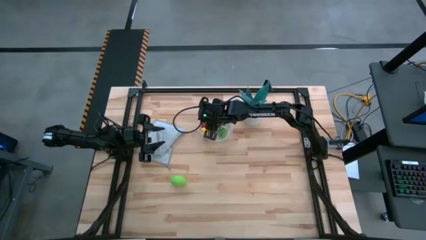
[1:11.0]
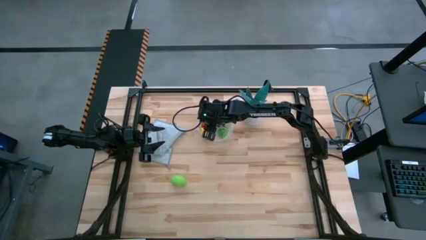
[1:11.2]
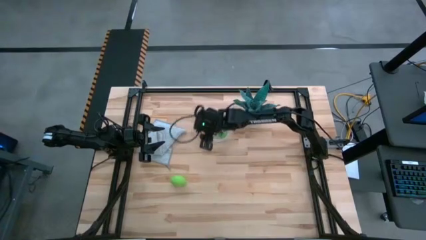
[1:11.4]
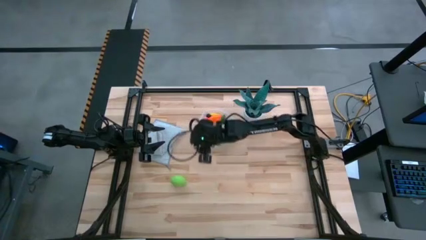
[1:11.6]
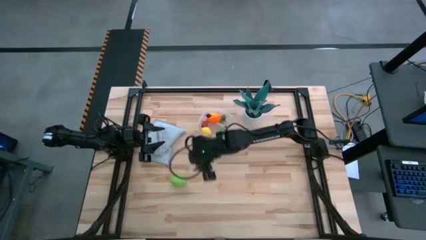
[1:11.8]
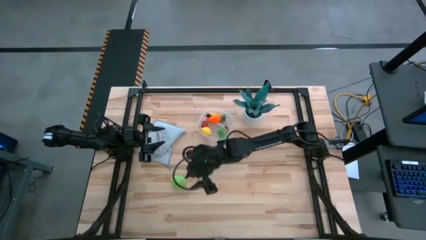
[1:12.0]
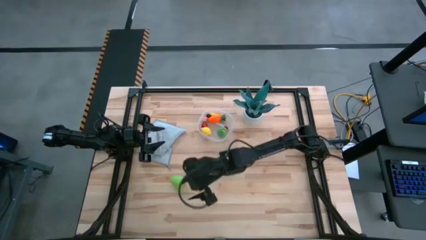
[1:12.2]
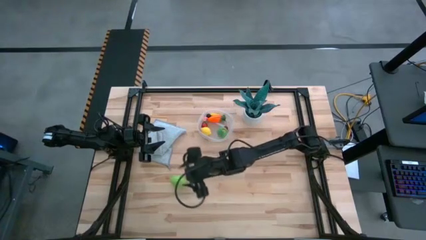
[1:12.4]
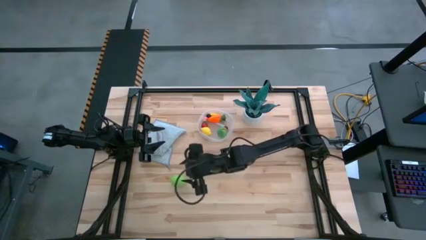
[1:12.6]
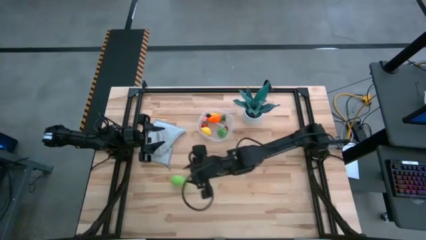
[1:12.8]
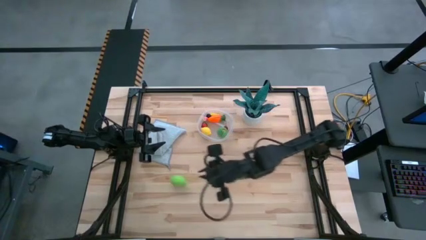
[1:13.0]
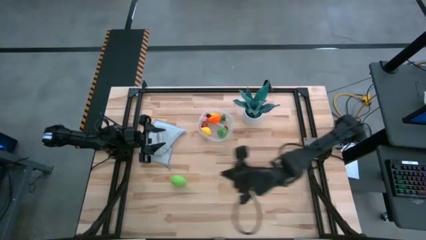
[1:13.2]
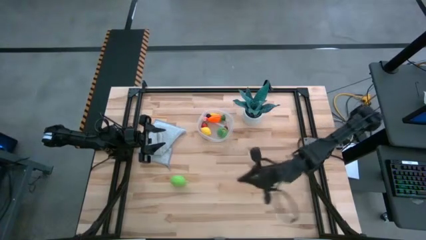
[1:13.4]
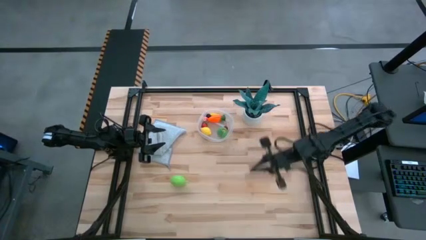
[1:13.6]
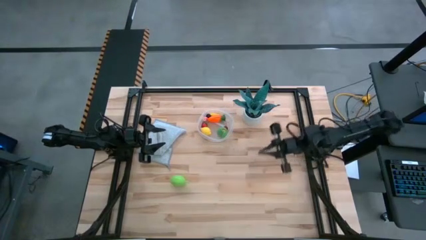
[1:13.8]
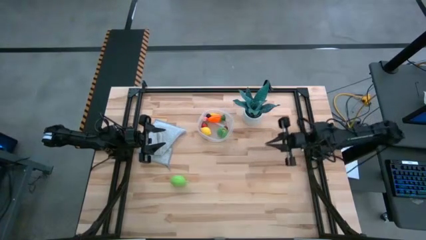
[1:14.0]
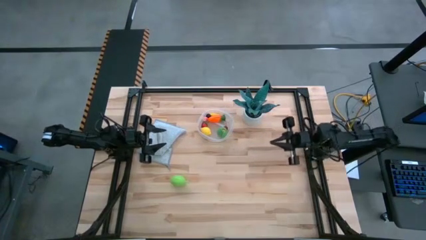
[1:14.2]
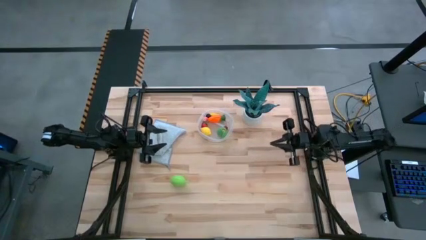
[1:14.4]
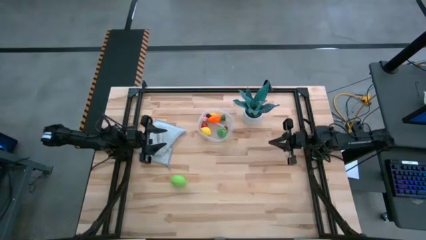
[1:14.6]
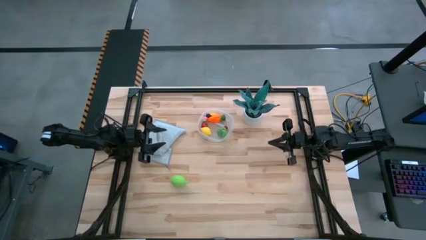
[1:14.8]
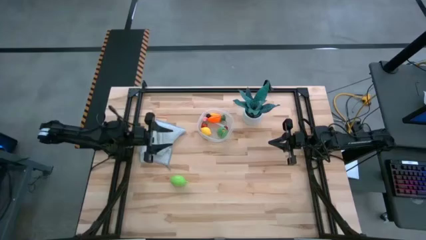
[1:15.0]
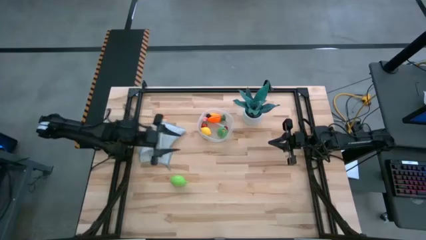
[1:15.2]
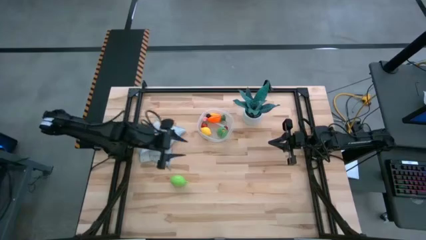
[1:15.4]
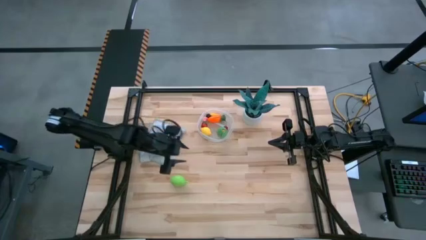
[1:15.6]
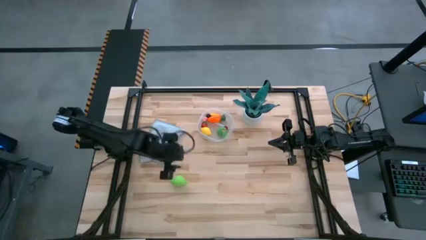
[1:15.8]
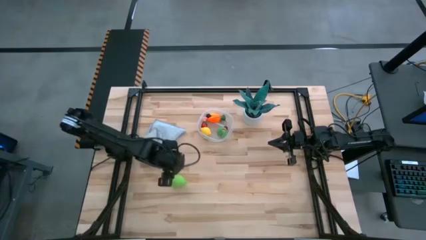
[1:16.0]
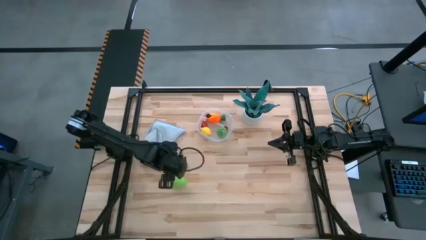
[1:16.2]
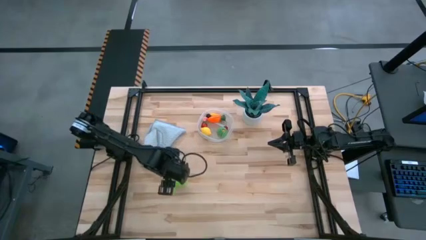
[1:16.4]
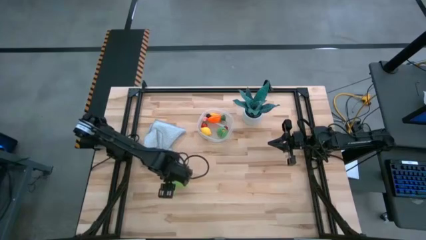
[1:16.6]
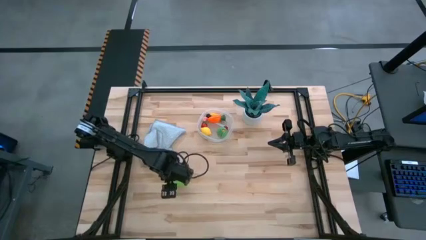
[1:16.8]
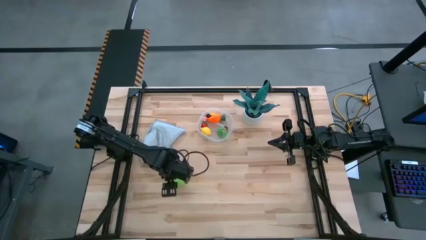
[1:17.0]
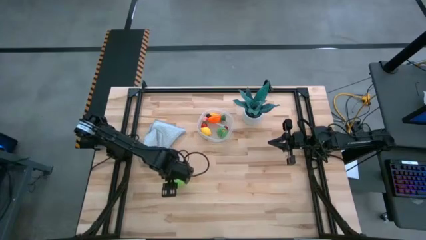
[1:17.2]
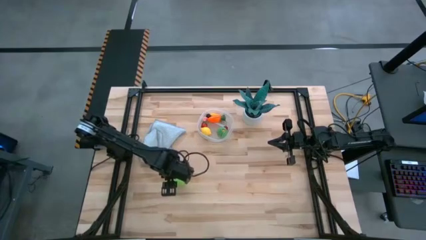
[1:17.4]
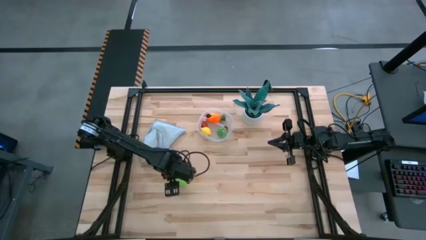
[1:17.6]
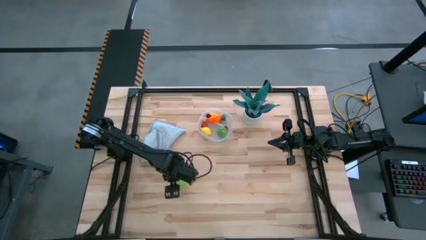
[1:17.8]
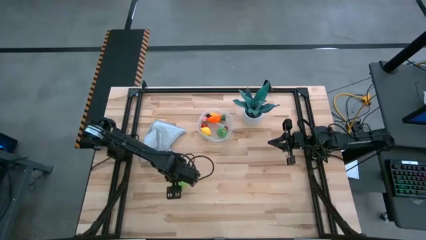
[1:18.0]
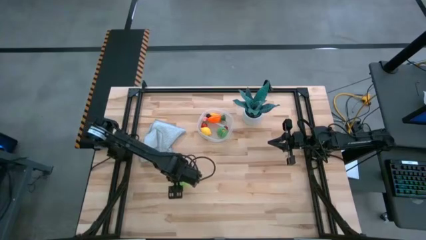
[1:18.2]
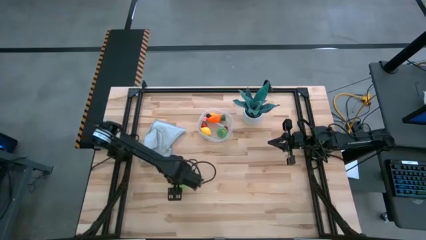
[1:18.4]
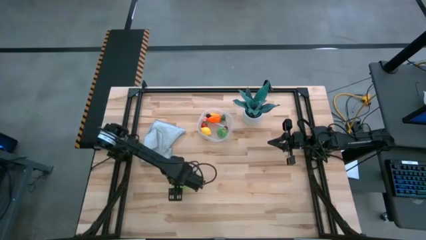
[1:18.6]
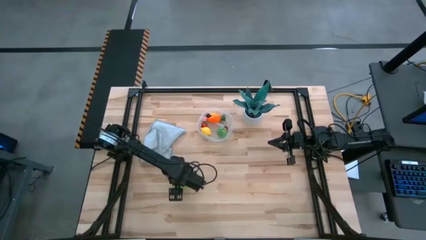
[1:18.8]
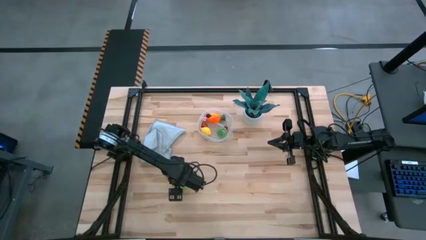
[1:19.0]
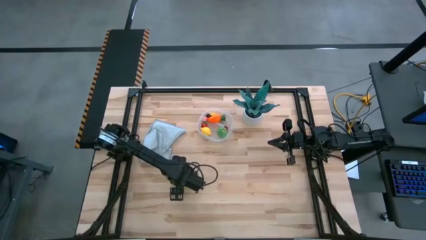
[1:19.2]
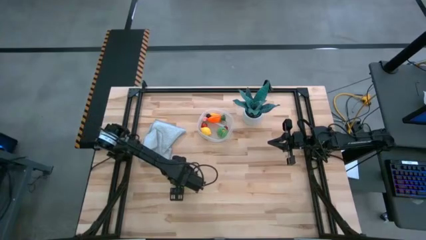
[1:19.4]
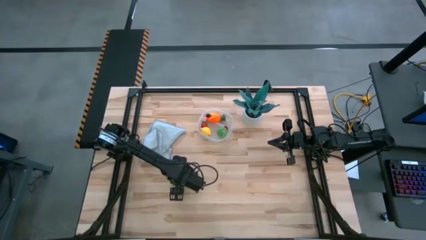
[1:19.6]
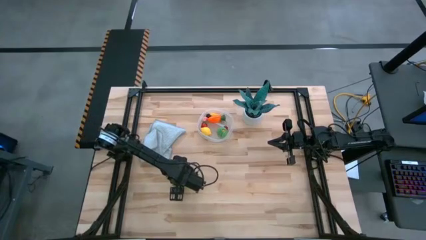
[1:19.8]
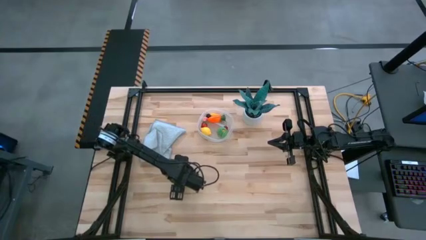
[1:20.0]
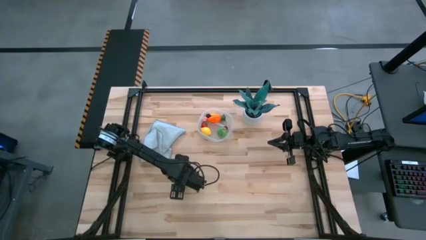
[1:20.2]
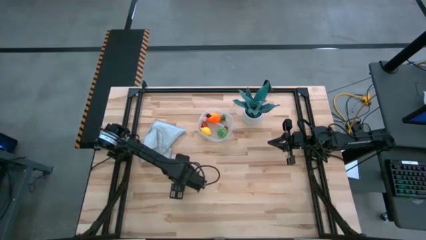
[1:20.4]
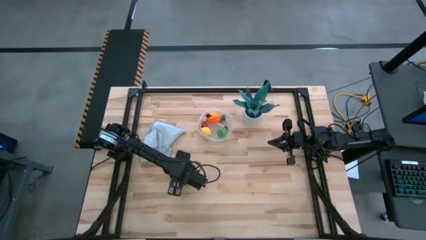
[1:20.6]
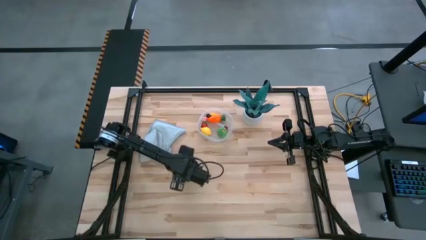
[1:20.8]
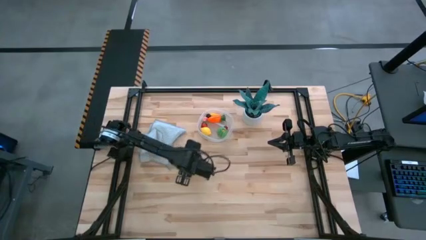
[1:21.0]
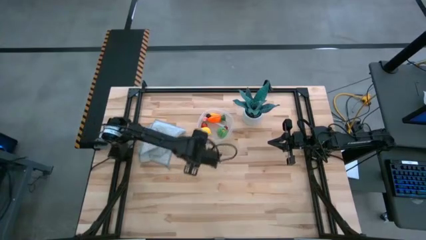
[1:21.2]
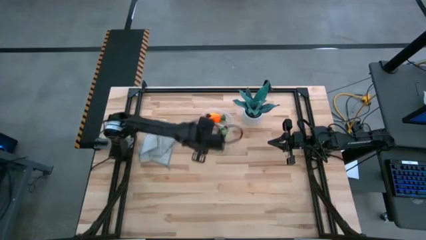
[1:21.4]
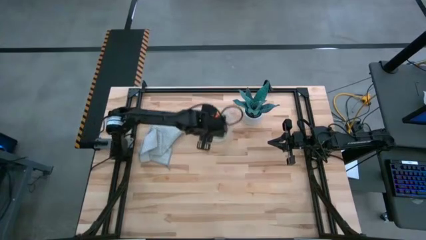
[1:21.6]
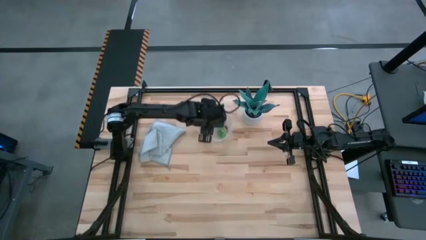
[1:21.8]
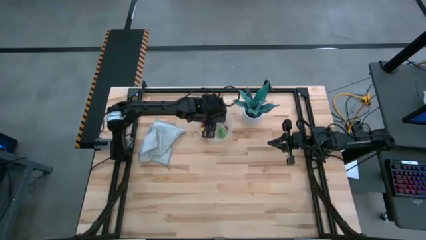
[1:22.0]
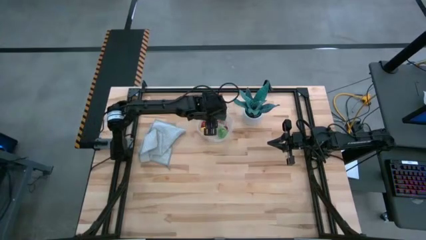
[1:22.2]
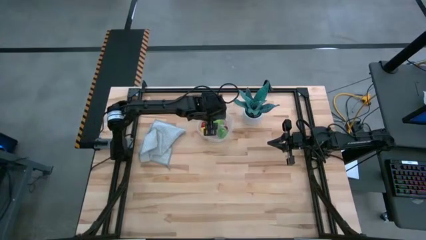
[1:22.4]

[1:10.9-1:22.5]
Task: Pick and placing Produce into tupperware
Put the green melon into the transparent container

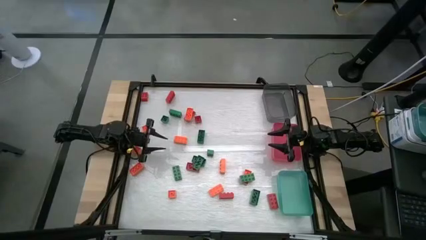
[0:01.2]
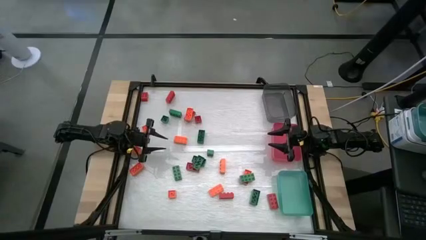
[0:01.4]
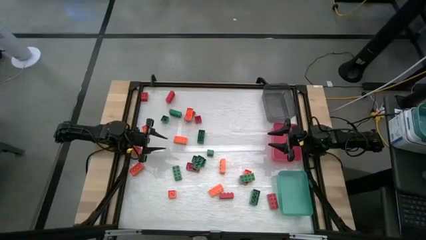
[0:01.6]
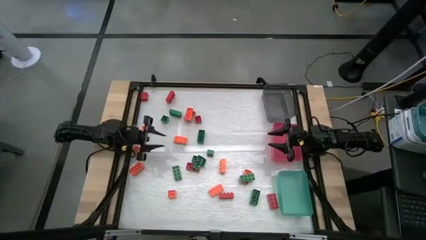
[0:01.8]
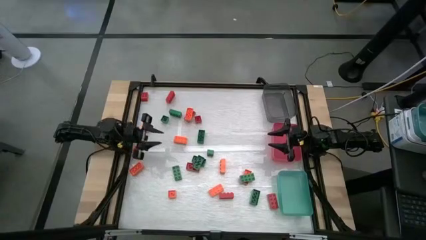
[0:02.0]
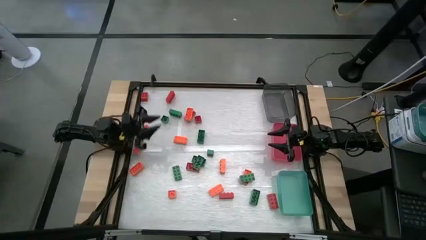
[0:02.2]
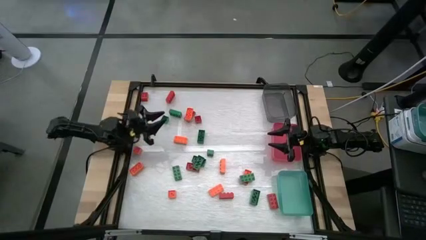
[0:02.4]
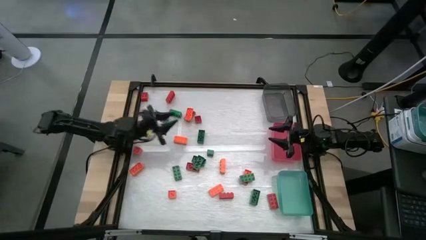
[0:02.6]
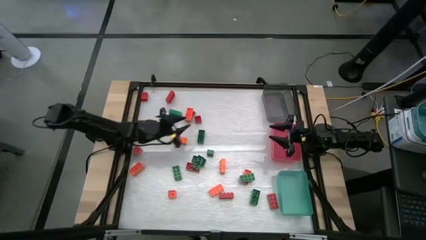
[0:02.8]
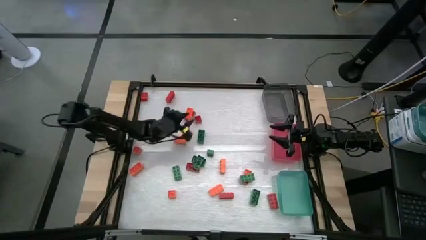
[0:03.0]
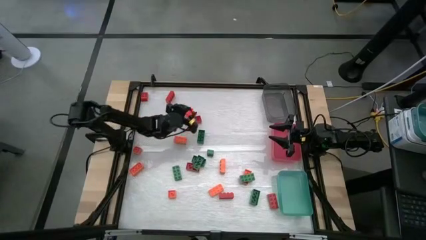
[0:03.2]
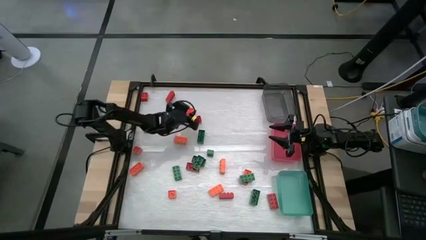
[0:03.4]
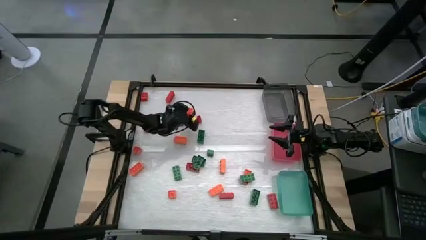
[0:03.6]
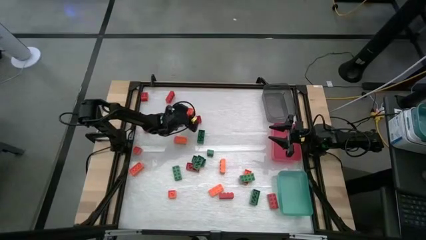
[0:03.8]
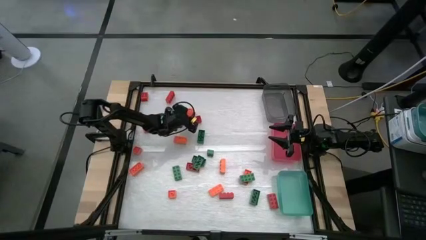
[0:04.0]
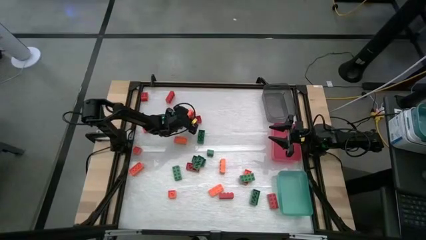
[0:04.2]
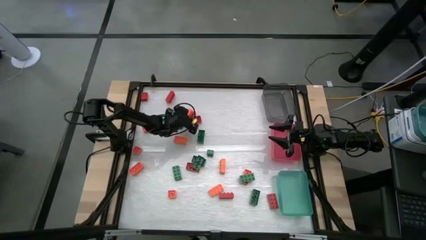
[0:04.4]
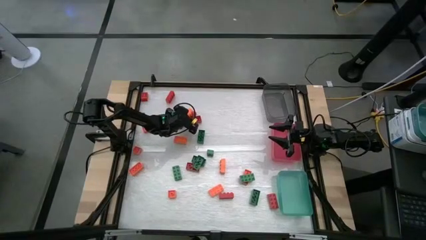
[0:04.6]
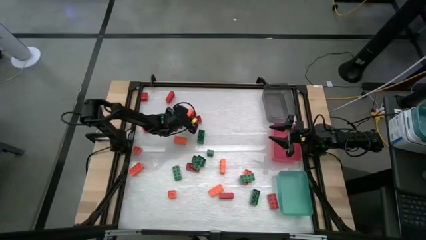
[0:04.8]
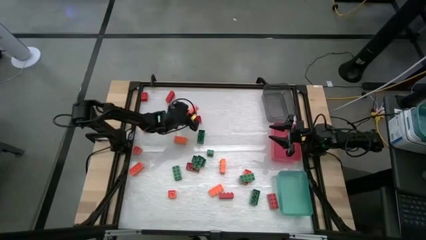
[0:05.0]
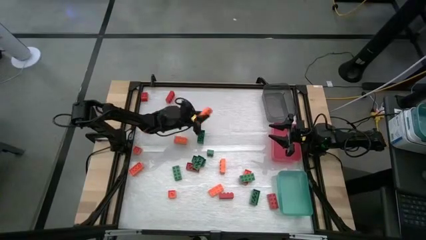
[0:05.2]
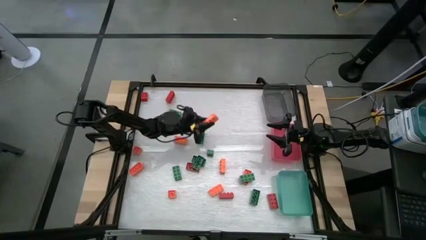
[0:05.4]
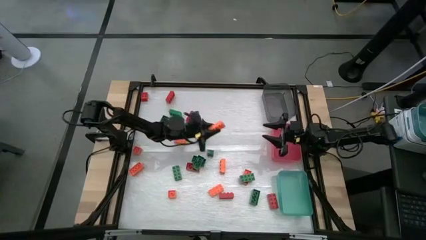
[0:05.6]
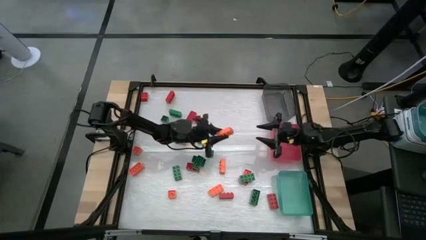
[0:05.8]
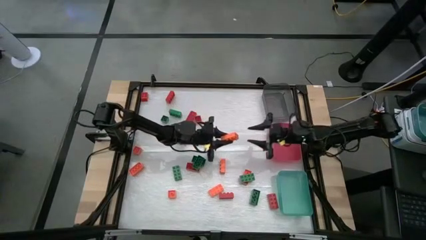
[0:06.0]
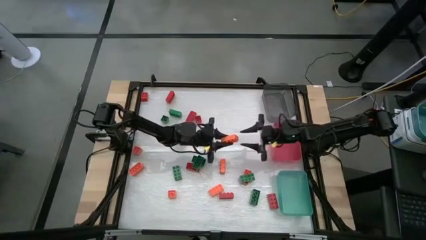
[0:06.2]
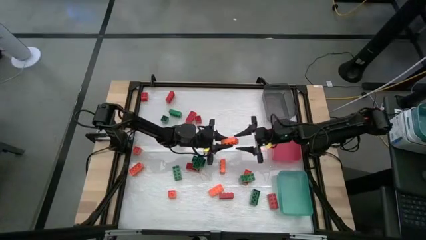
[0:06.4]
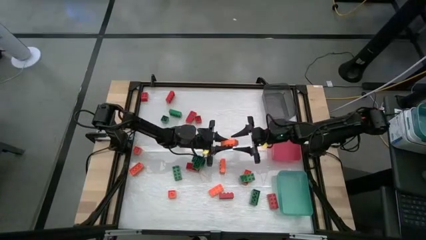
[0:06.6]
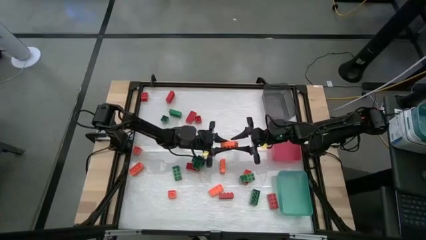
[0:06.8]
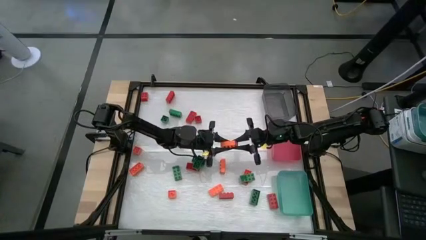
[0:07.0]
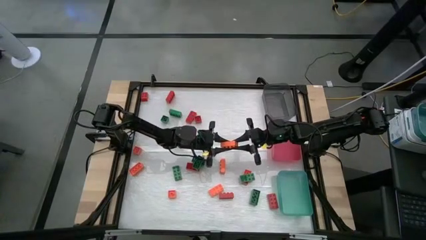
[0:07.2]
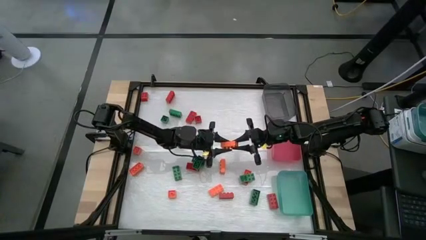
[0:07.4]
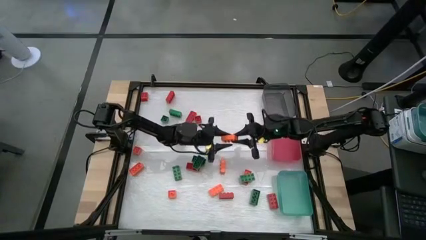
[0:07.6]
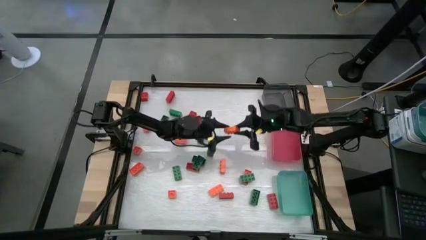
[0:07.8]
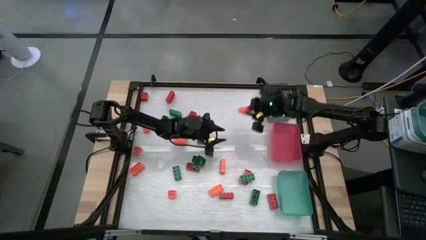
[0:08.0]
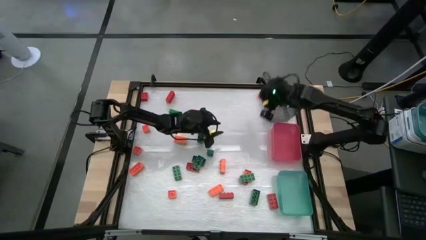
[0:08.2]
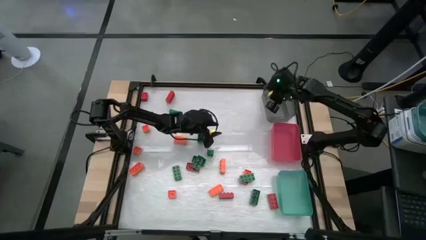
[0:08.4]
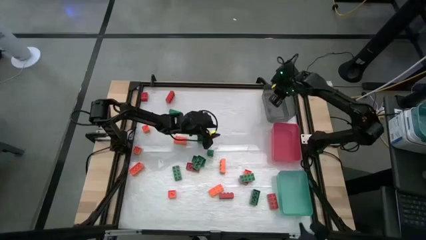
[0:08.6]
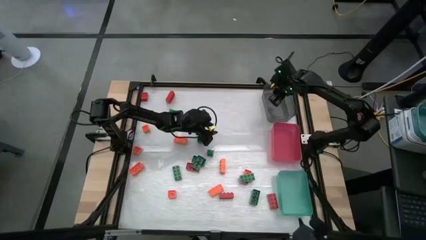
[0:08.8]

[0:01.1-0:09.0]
Task: Sort blocks
Put the orange game piece in the black bin
